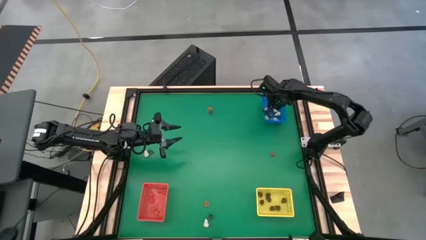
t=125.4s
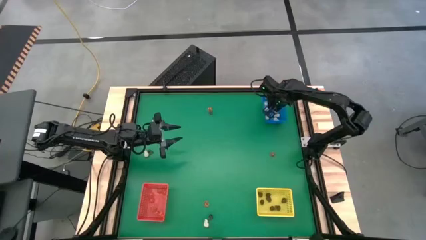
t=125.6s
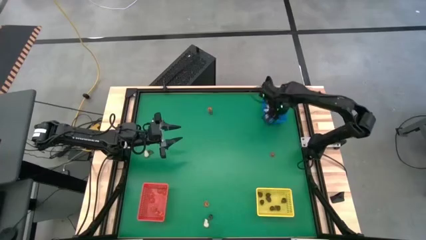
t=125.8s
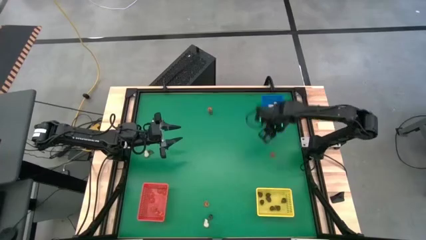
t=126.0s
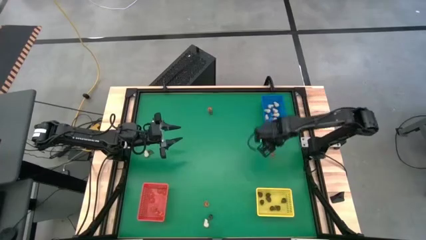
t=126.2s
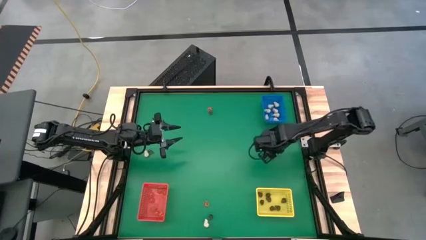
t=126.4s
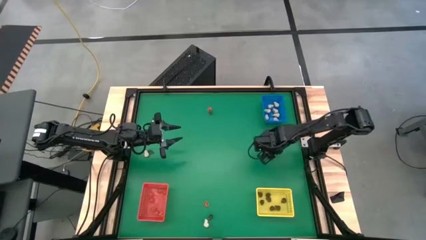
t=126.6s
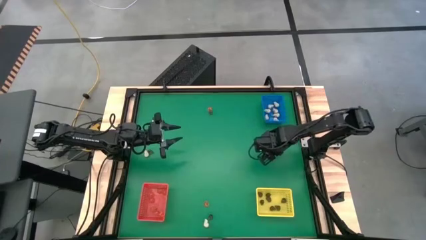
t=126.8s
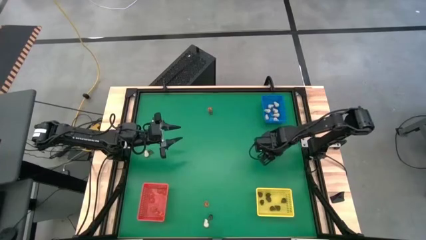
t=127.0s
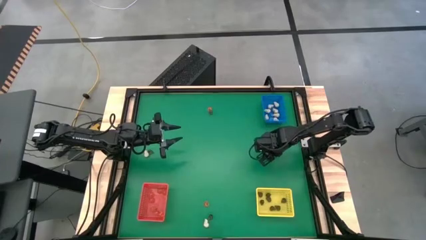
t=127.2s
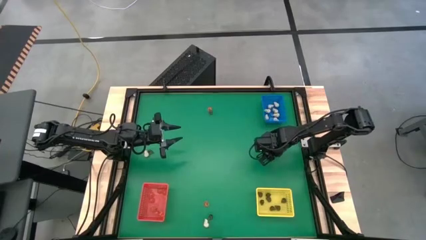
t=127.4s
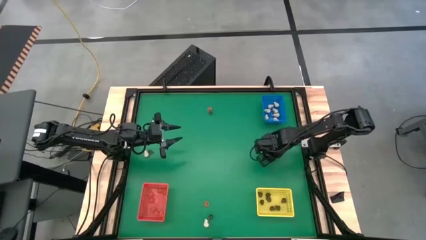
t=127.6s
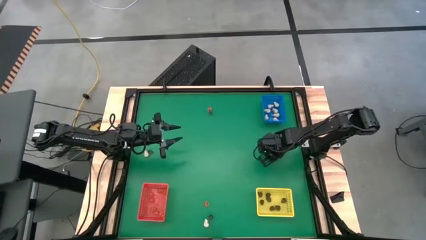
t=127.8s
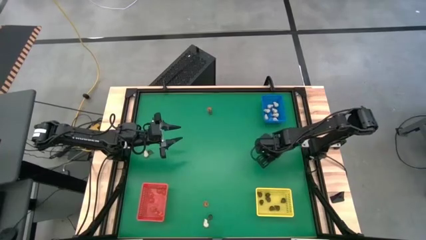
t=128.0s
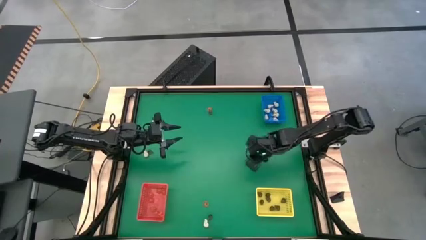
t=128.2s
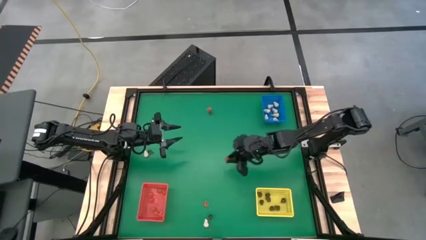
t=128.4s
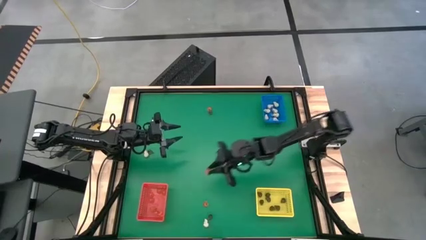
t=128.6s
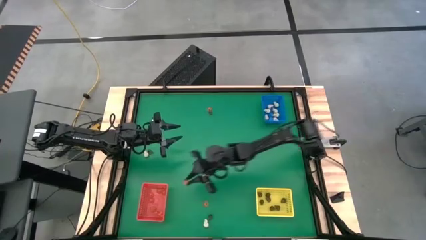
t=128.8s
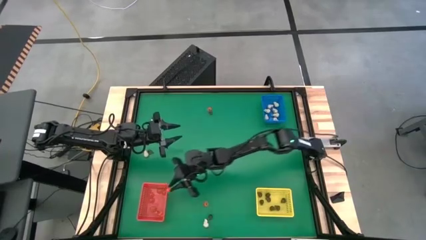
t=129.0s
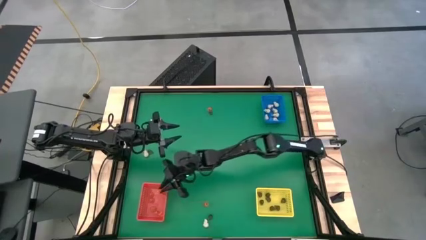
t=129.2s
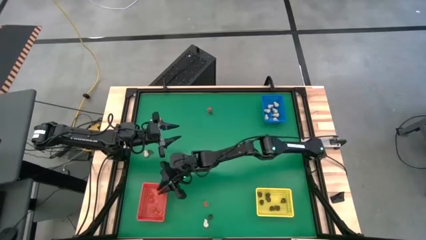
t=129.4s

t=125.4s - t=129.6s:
Task: Sort Halloween decoration
Put the orange pumpkin toy into the red bin

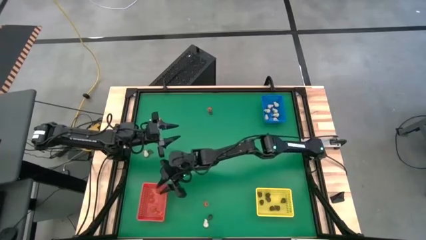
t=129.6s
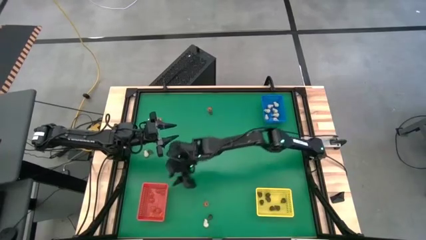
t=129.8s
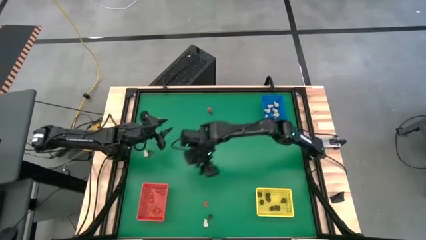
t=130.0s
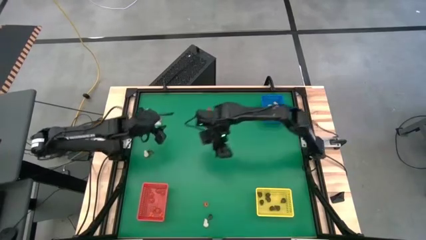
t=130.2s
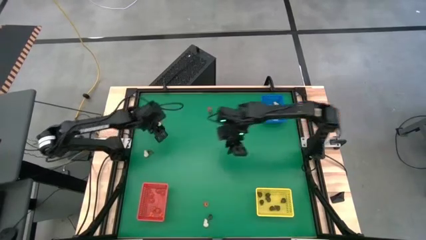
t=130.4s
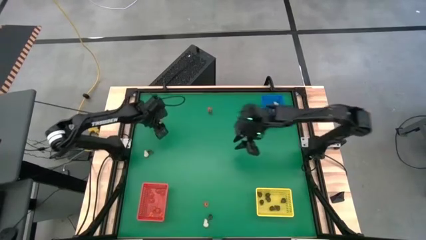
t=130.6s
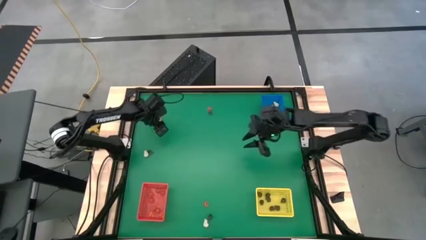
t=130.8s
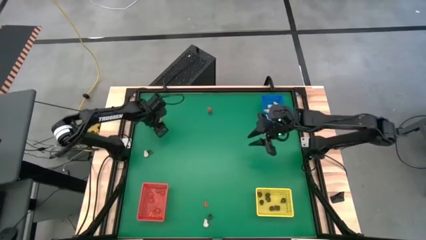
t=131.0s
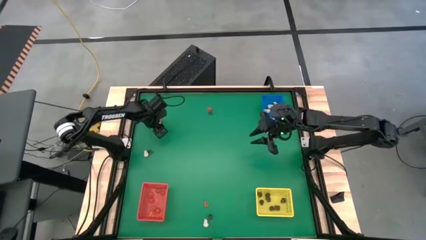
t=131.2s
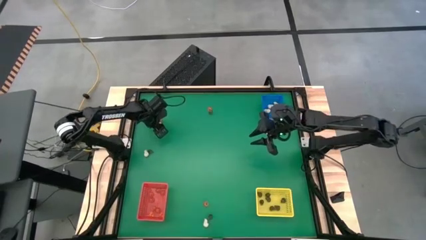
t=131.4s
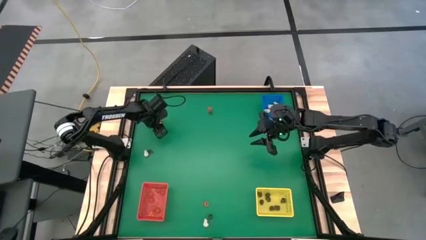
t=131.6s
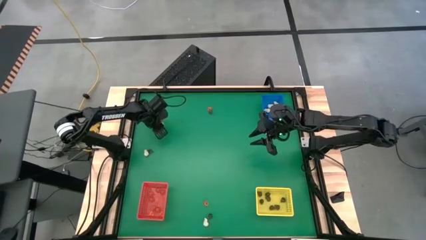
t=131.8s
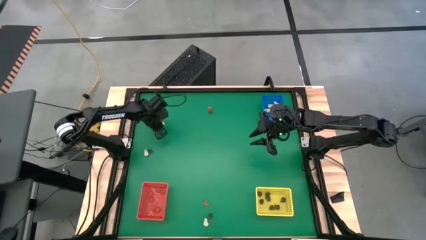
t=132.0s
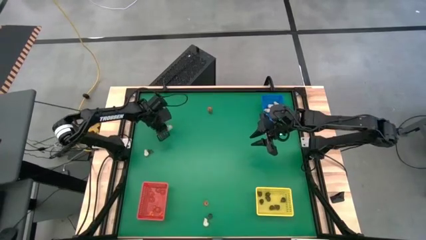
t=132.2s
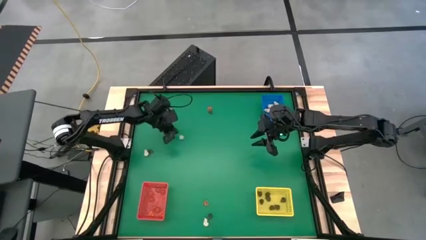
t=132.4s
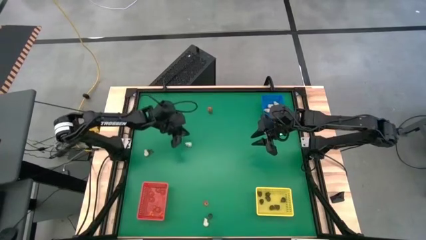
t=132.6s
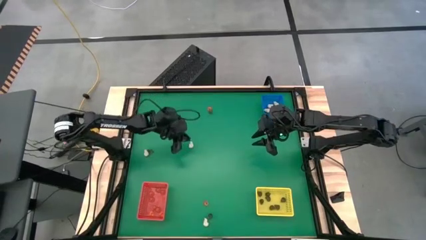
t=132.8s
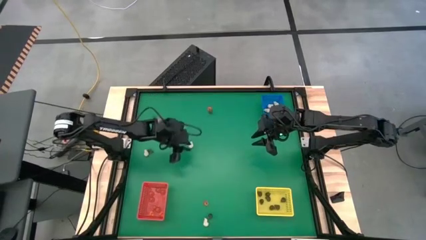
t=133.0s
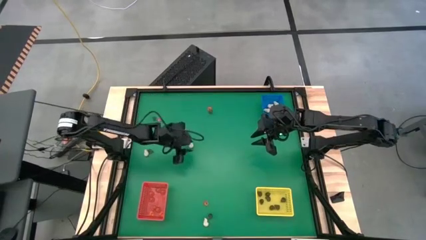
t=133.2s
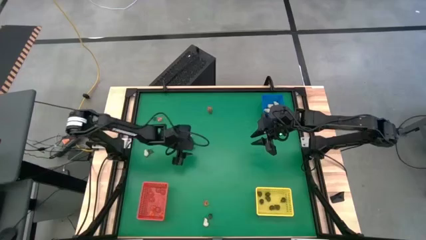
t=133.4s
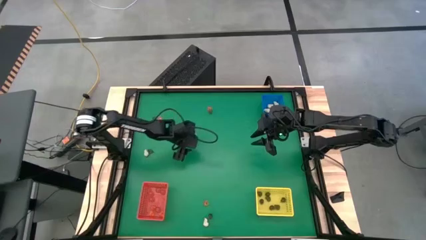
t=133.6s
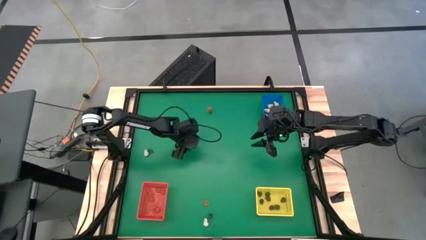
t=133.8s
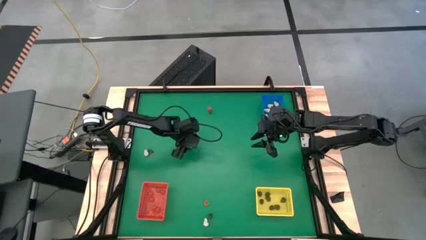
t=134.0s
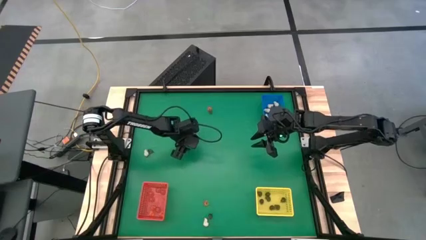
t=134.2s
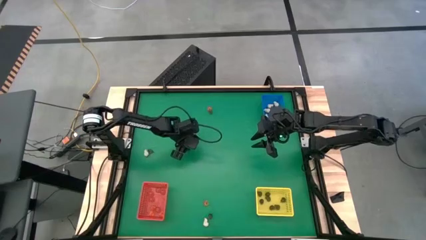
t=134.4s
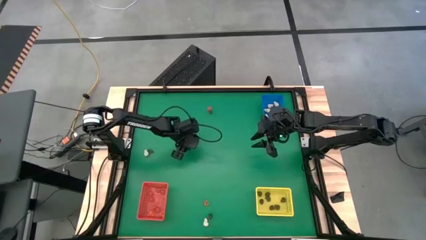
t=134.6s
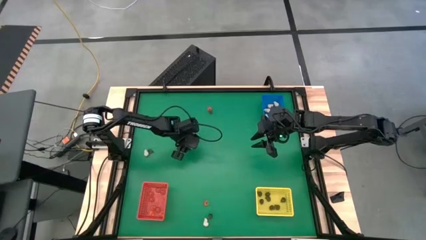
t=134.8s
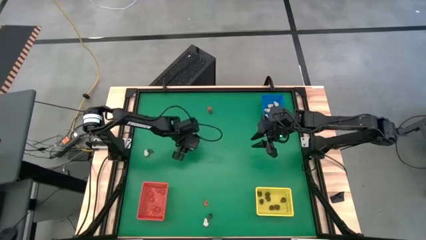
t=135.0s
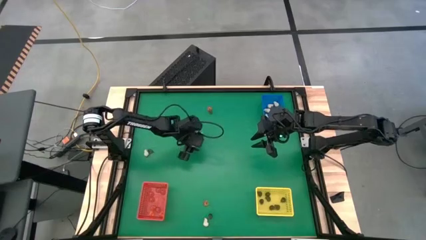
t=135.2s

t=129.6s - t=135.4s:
Put the white skull toy into the blue bin

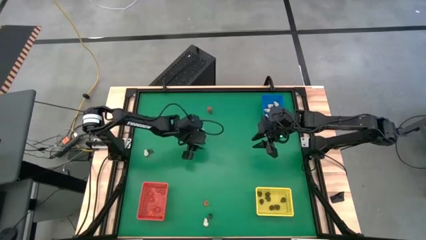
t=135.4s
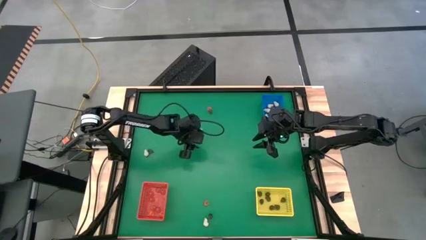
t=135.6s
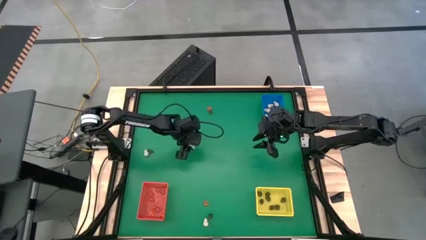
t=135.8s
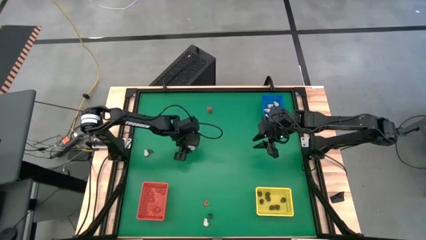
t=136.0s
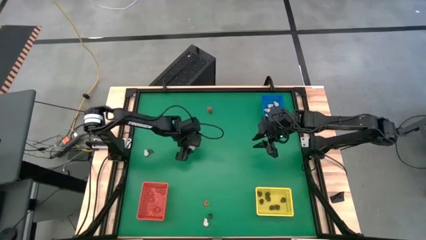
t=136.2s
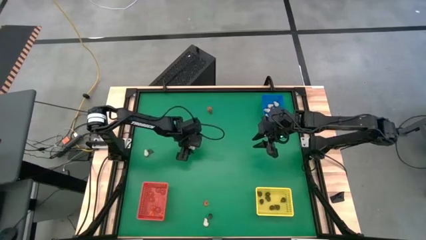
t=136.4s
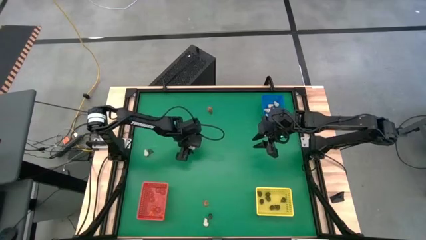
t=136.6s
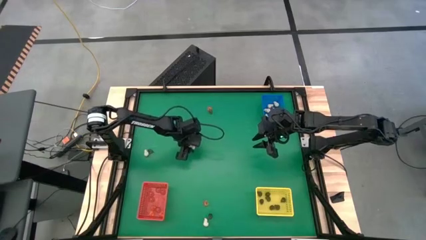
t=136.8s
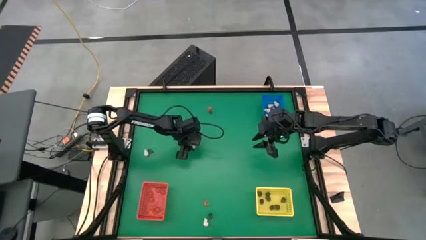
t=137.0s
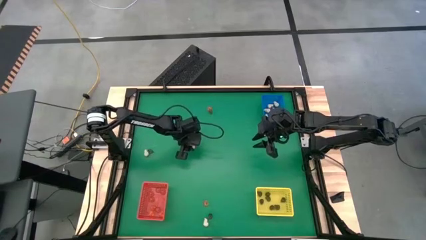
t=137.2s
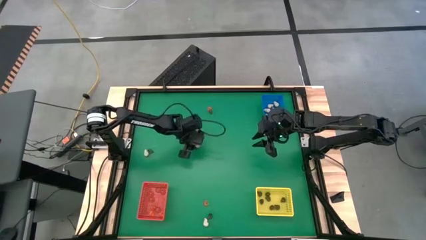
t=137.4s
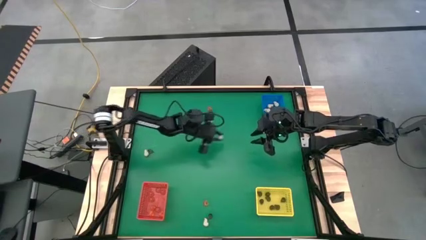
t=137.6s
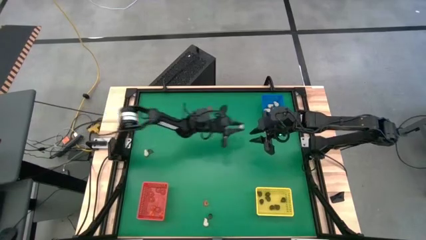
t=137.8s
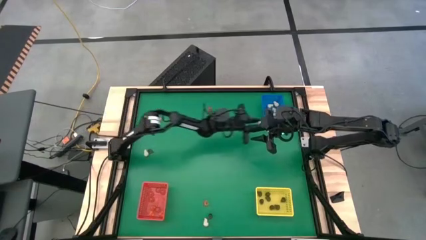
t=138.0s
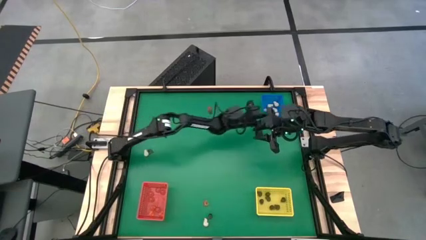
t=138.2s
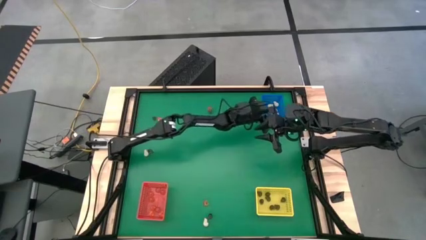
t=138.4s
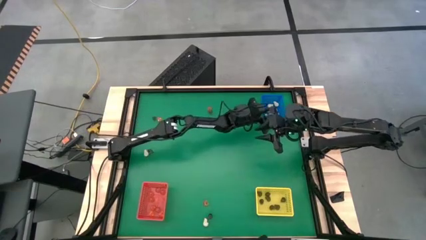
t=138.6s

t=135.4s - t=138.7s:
Put the white skull toy into the blue bin

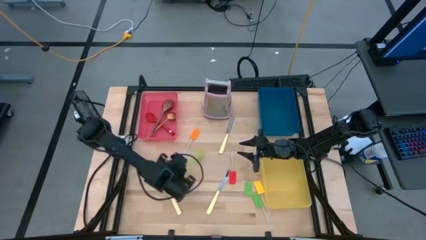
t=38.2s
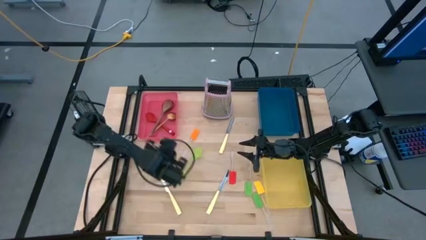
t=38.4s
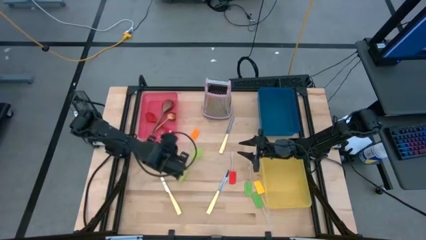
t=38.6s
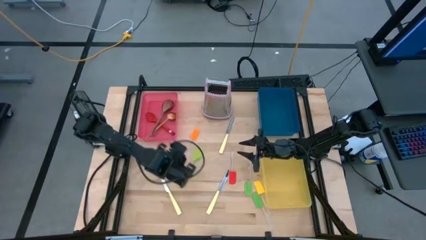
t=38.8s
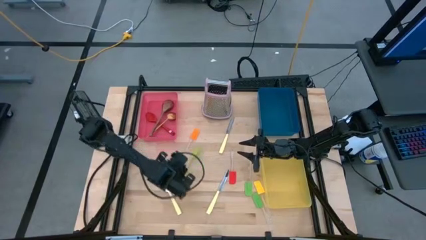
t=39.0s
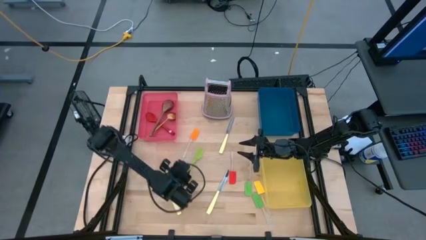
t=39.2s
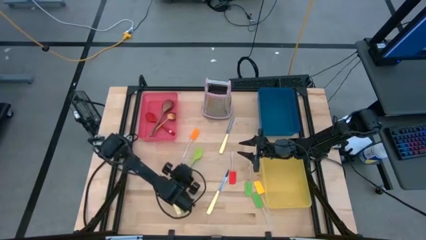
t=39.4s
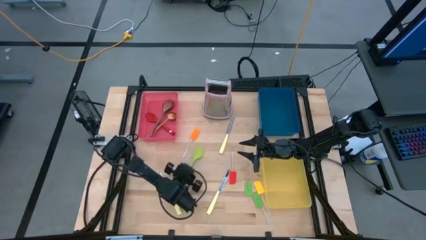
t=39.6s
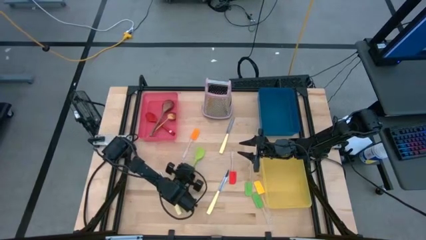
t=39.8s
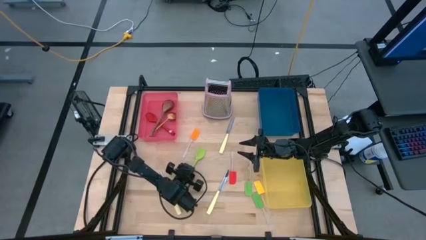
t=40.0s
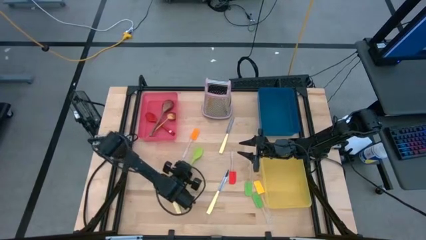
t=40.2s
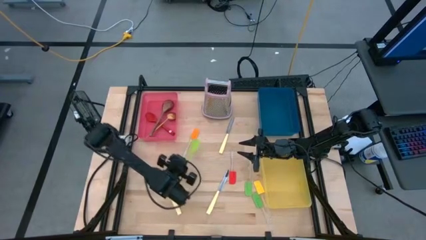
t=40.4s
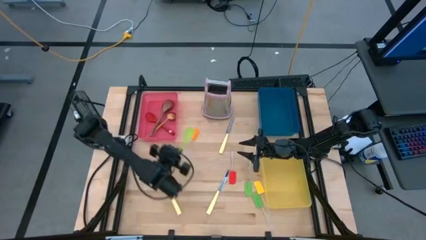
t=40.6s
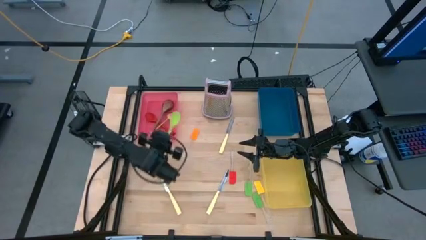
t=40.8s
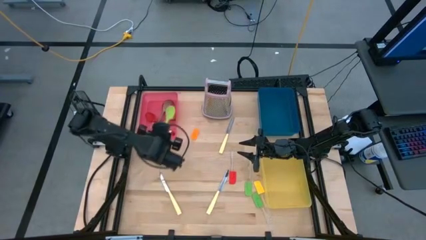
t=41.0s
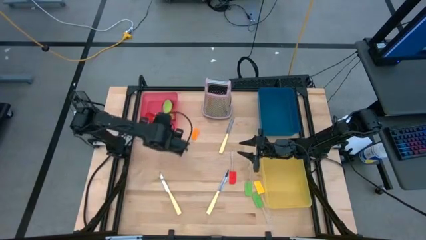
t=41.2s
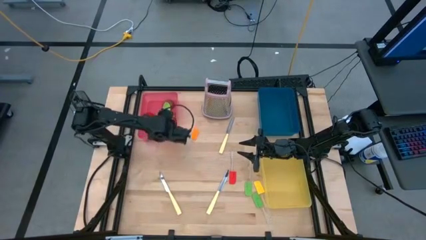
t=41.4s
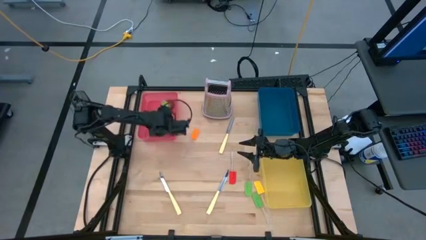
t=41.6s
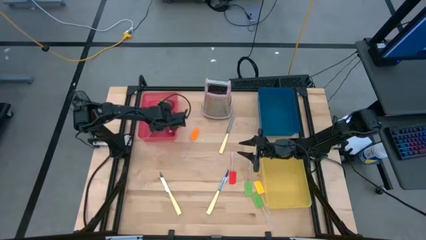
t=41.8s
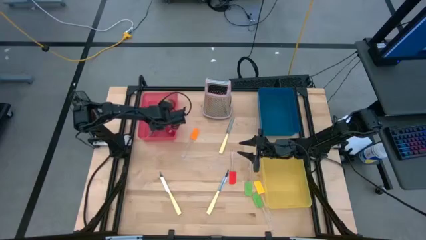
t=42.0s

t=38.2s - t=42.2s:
Task: Pick & Place Kitchen Items
Put the green baby spoon into the pink bin
